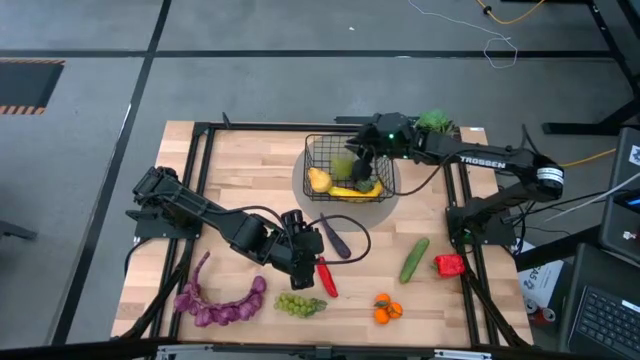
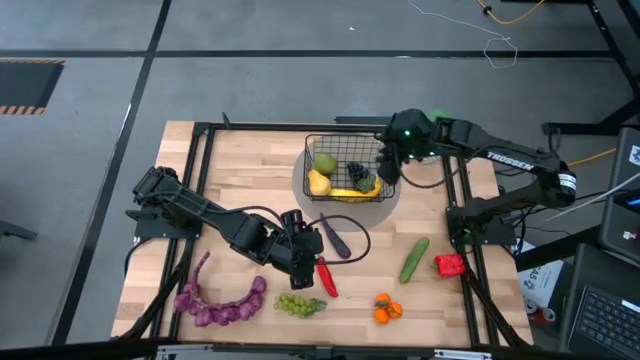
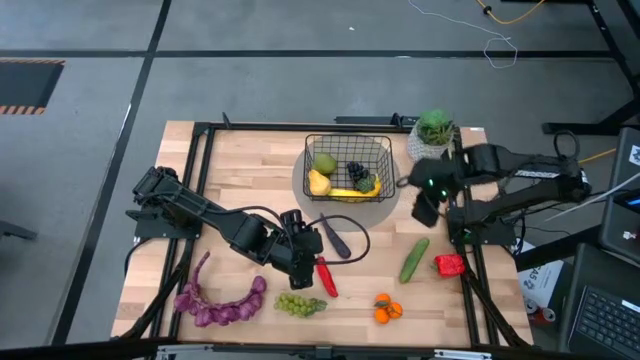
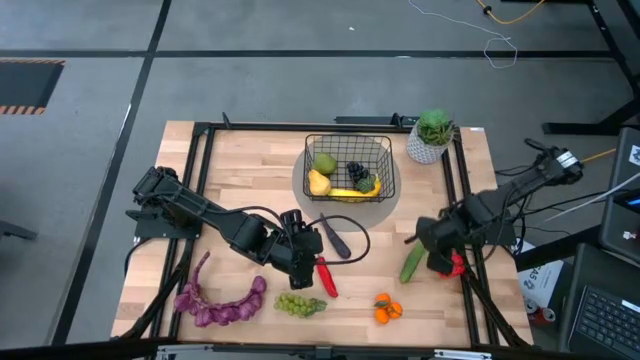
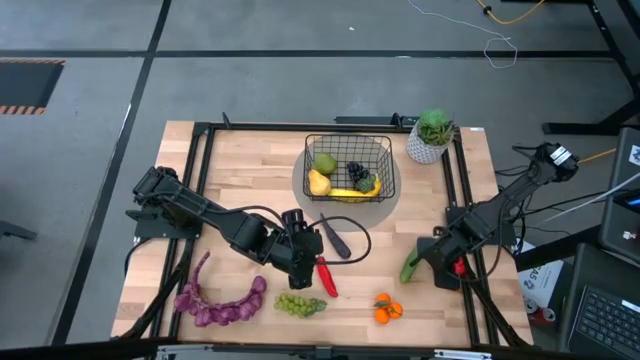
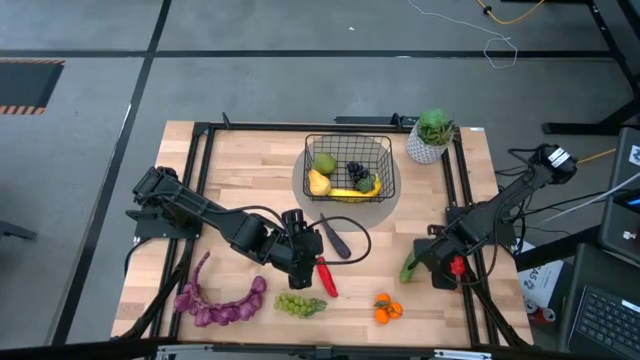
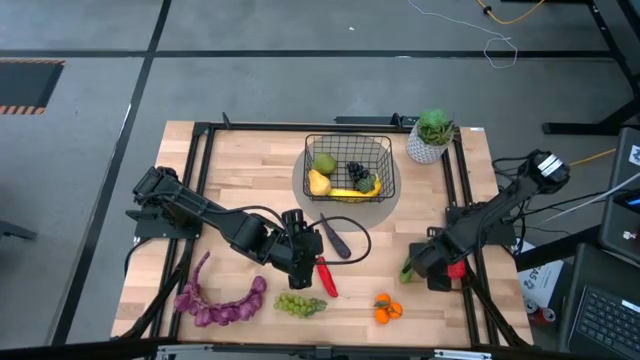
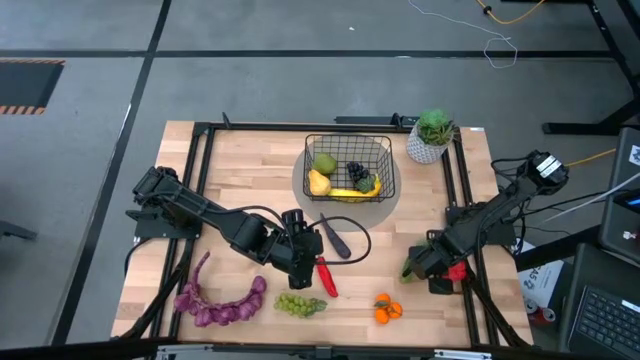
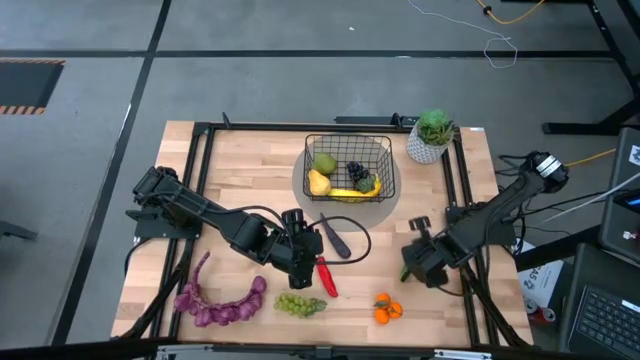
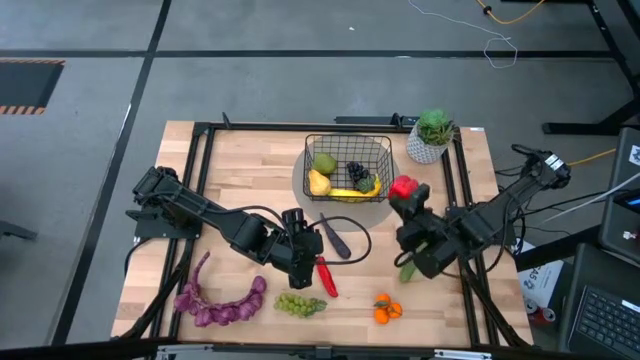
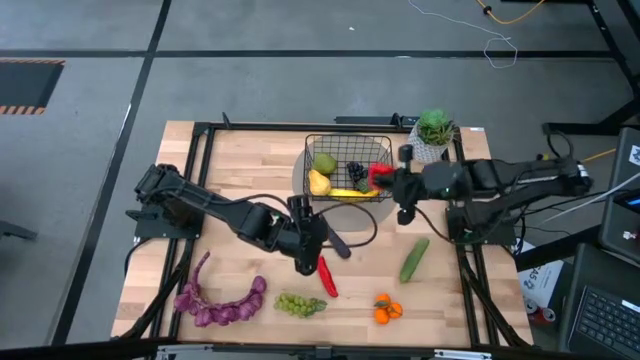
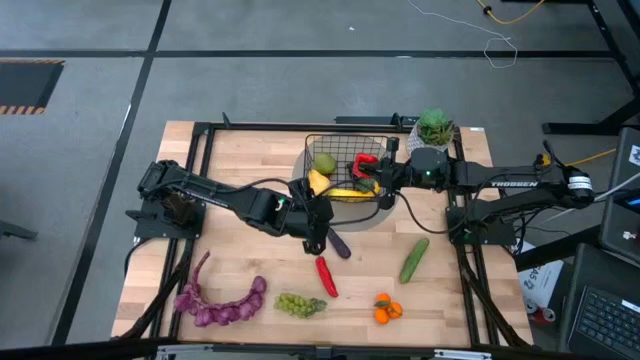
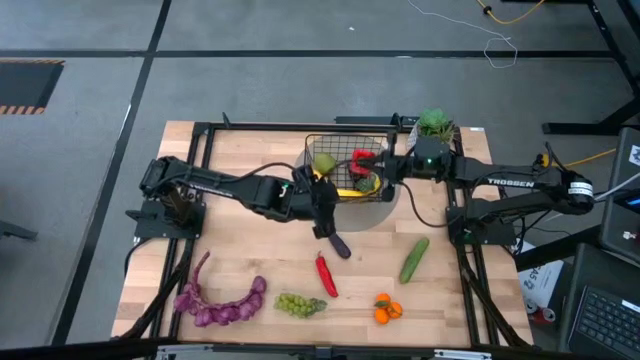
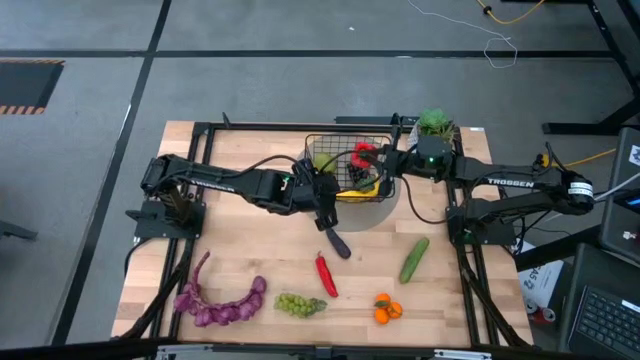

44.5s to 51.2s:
Task: Build produce basket
Put the red bell pepper into the black wire basket

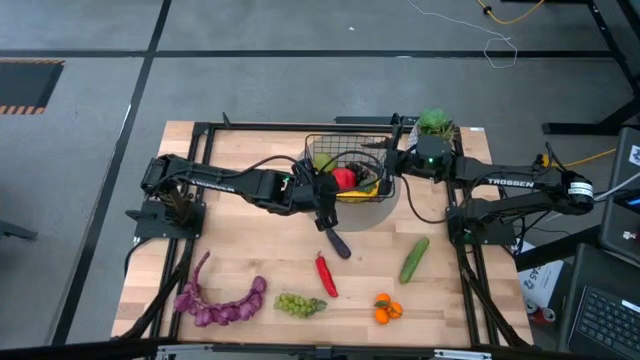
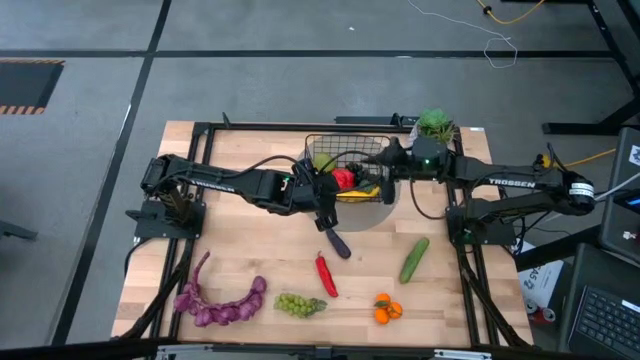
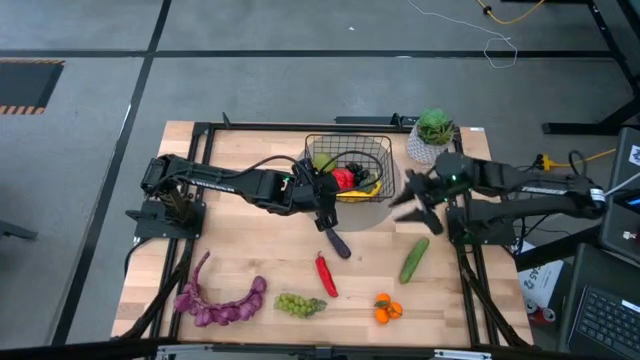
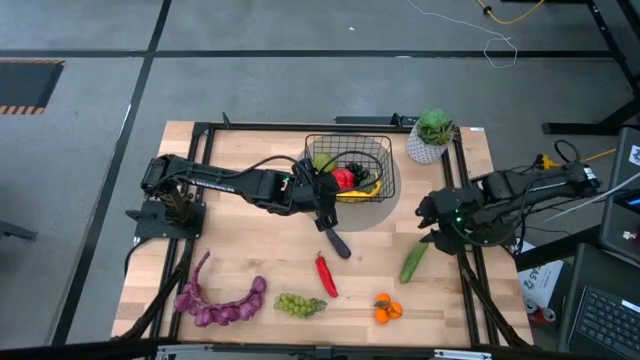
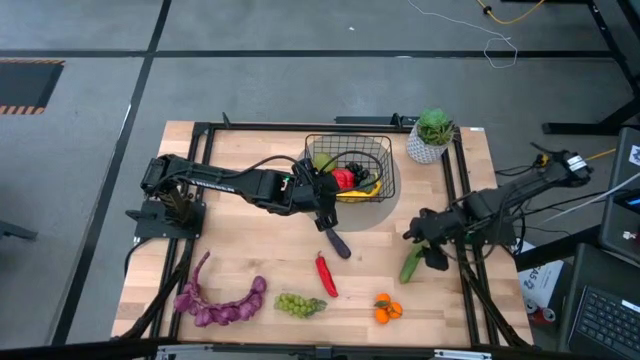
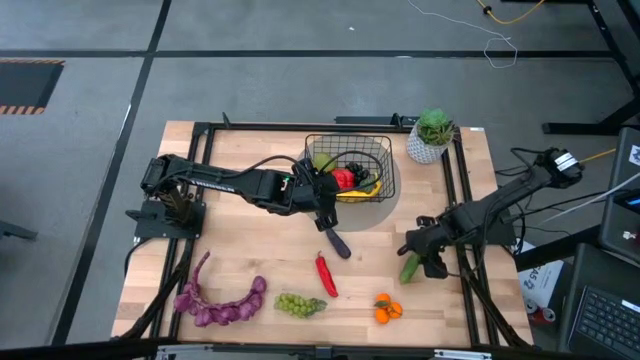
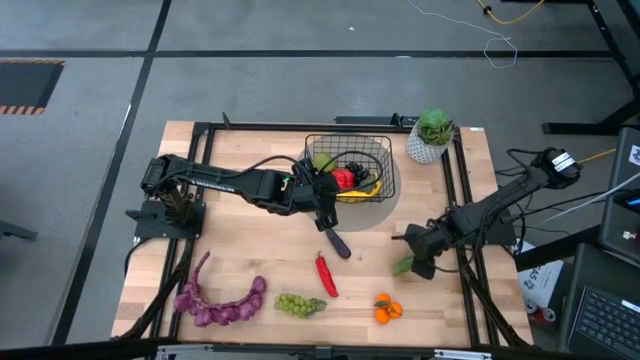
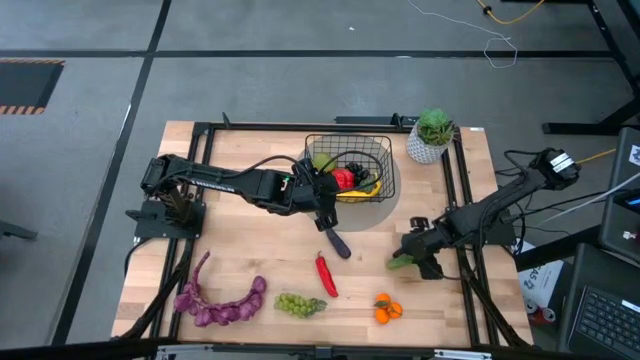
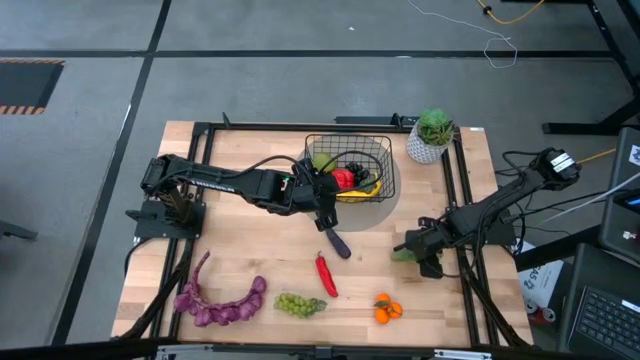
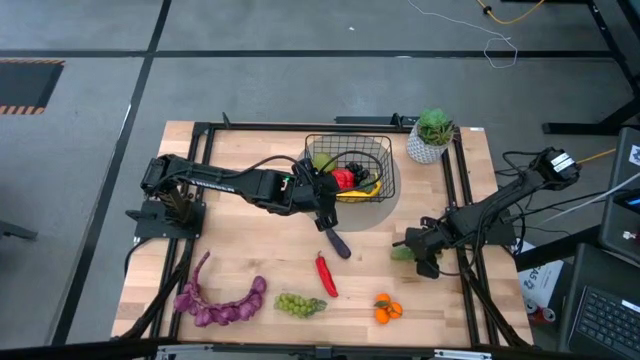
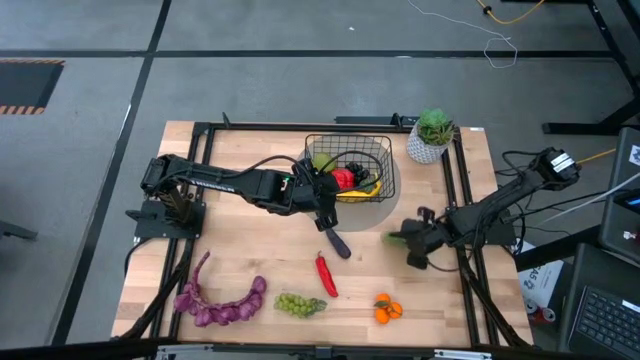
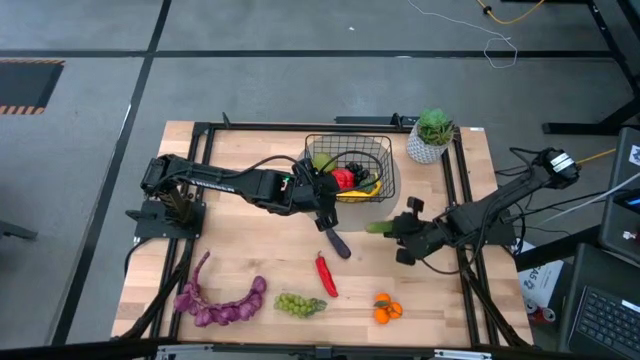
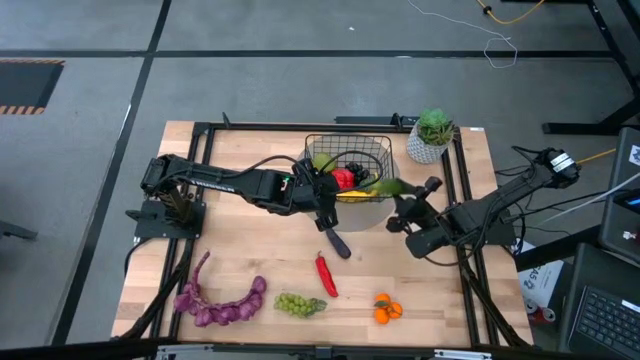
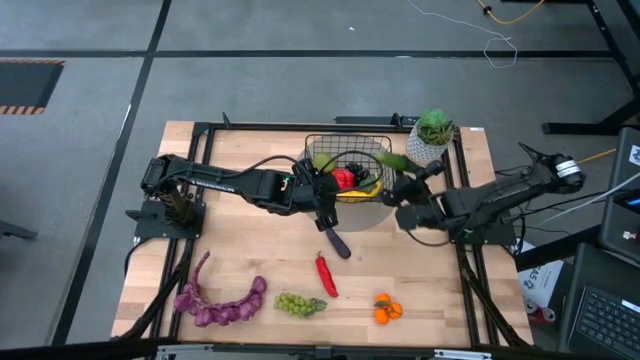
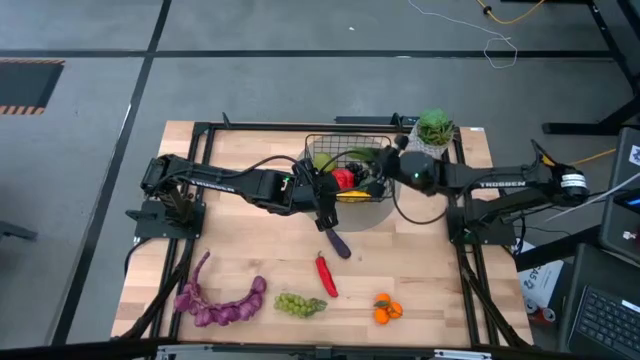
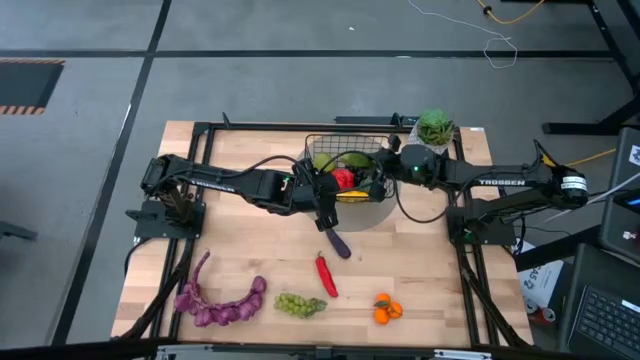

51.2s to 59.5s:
Put the green cucumber into the black wire basket

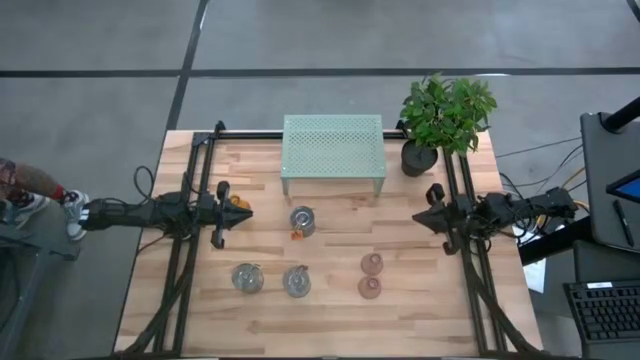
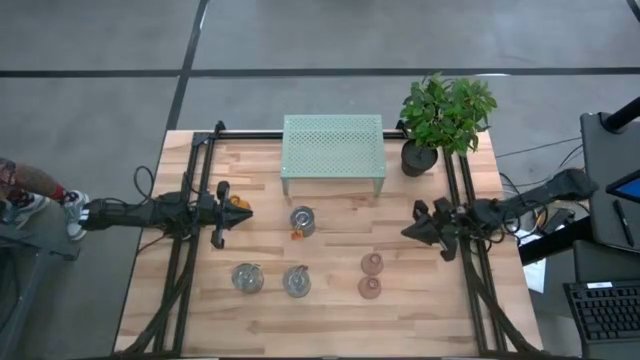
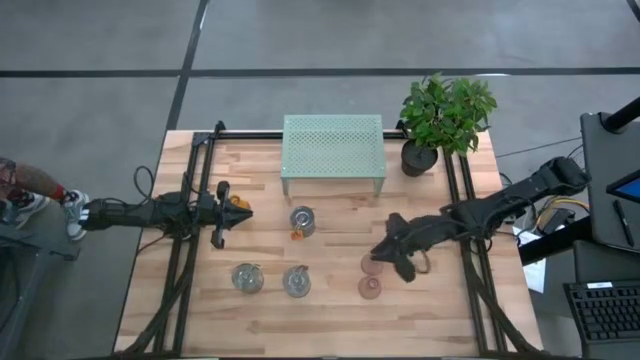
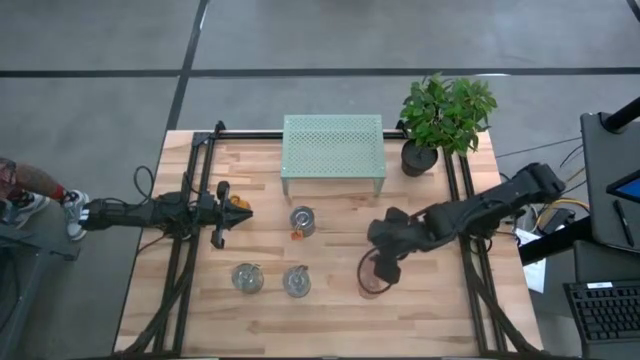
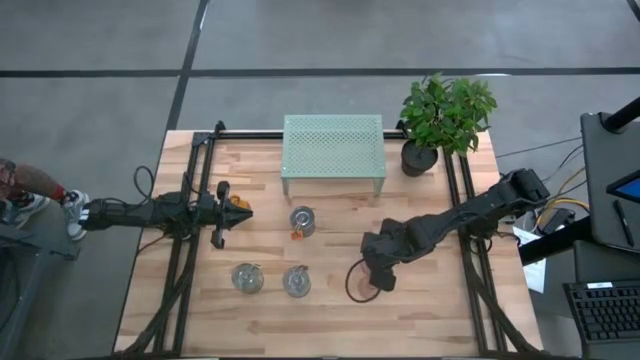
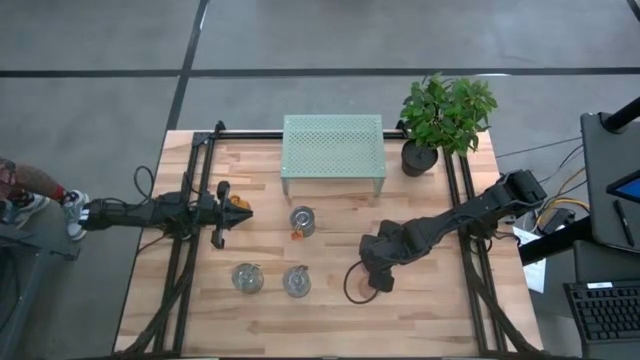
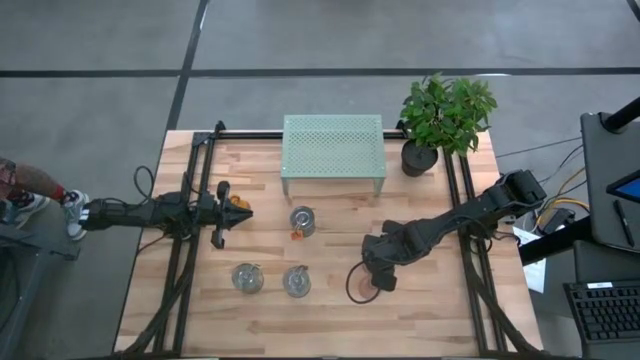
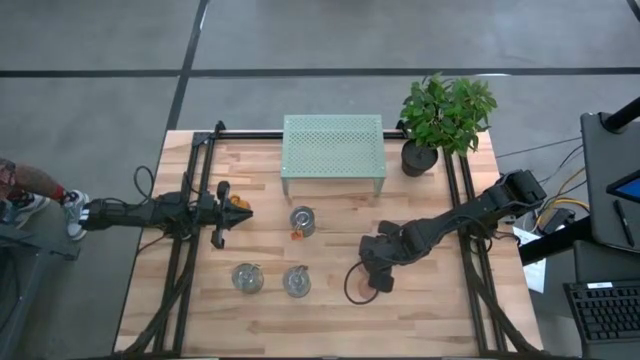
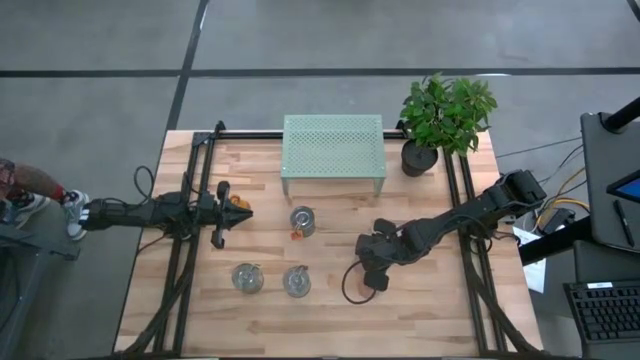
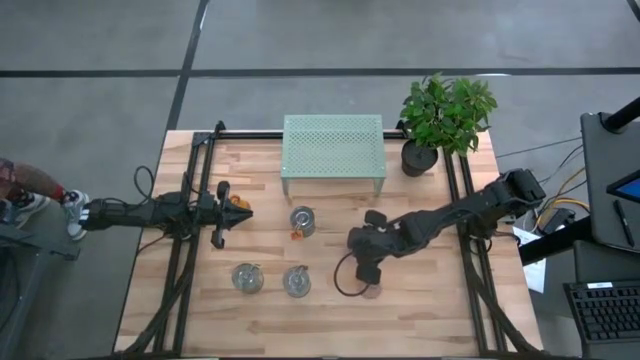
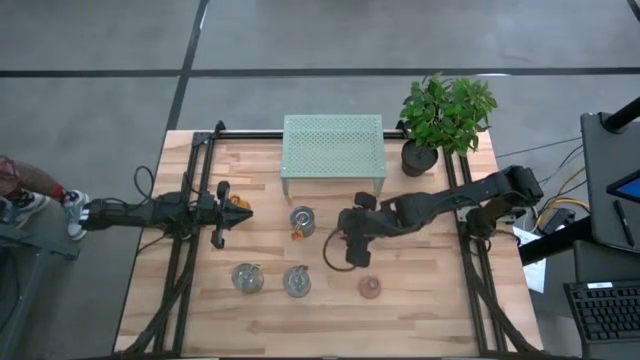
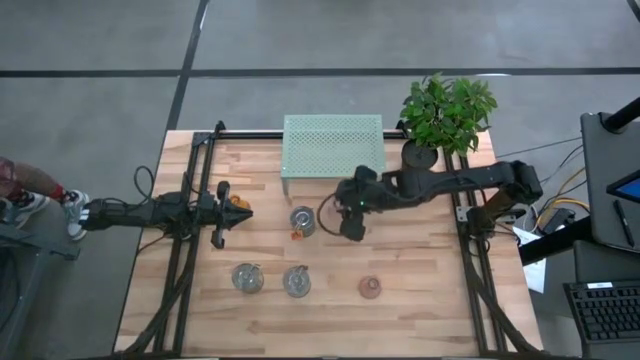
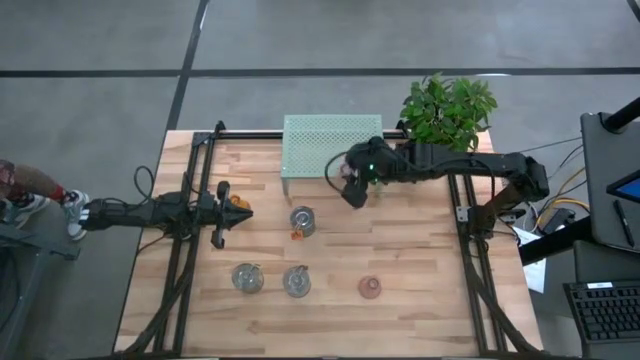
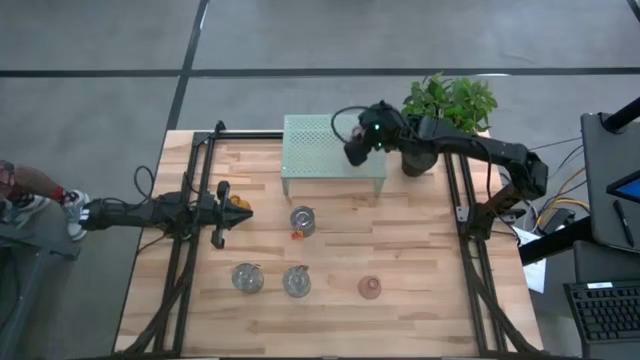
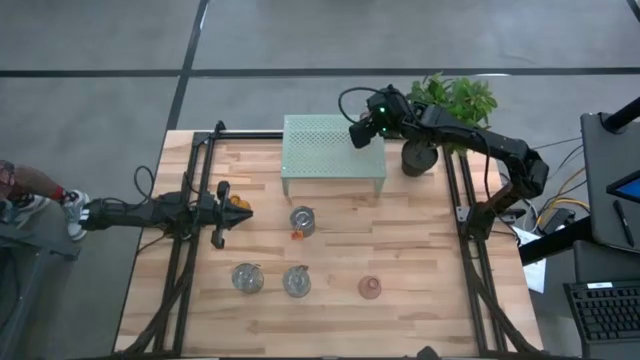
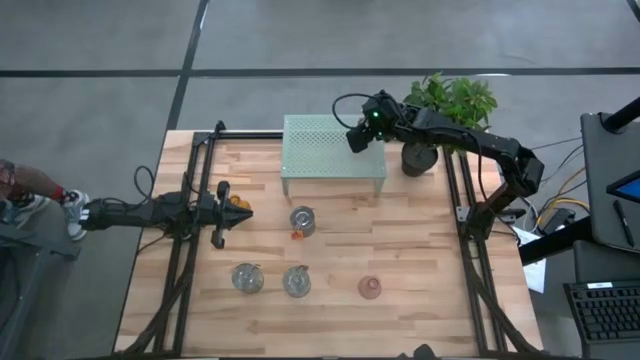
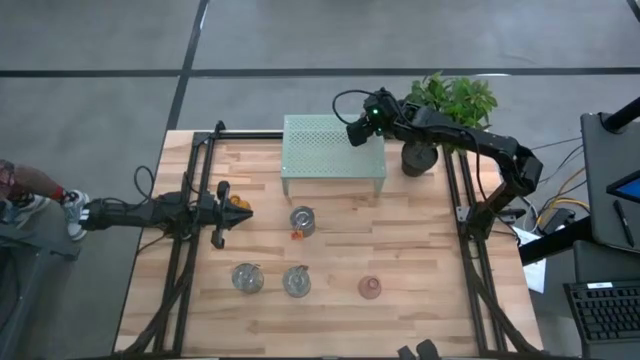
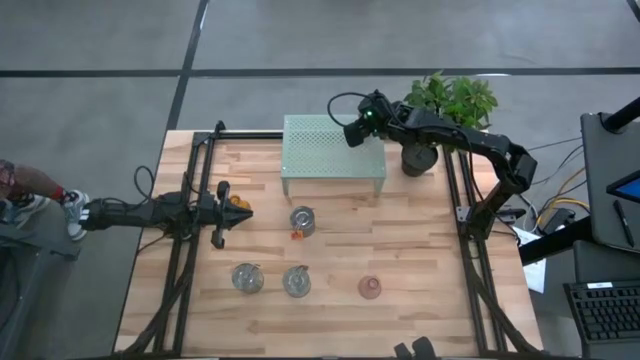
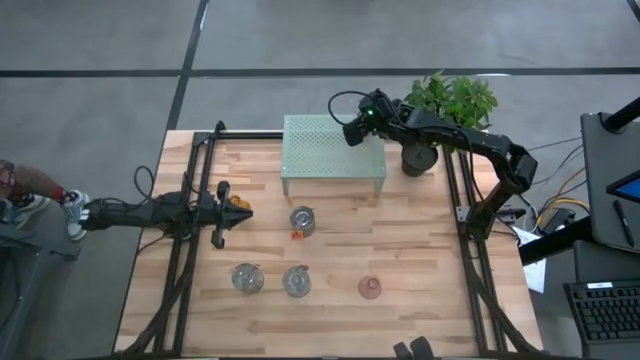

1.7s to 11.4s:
Task: Pick & Place candle stick holders
Put the top pink glass candle holder on the shelf
